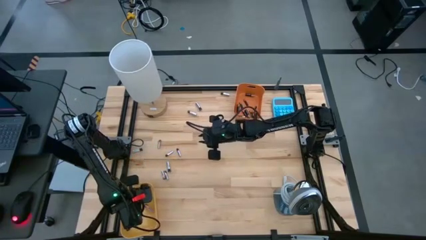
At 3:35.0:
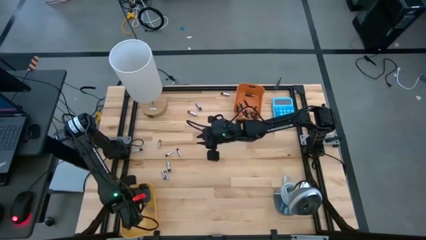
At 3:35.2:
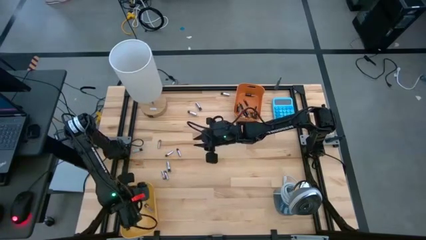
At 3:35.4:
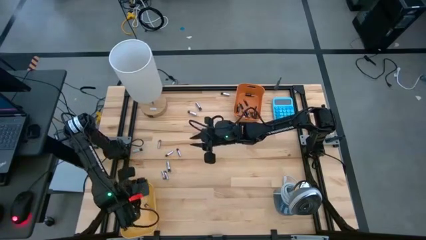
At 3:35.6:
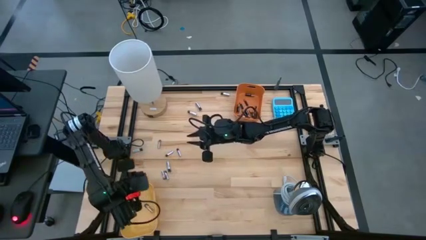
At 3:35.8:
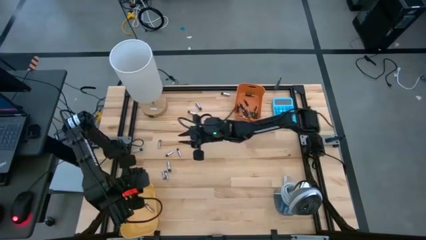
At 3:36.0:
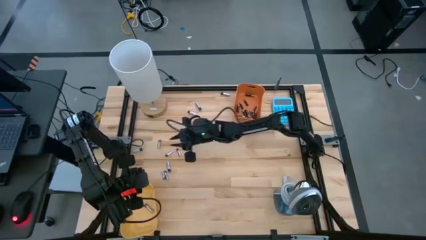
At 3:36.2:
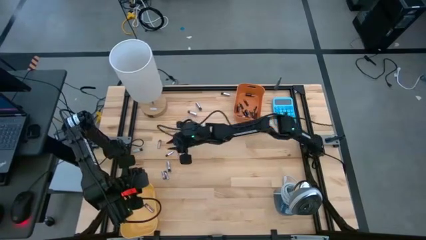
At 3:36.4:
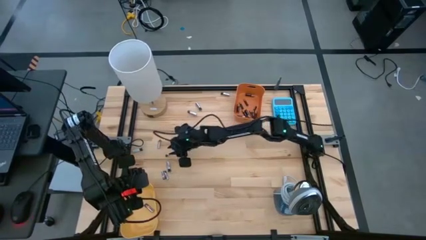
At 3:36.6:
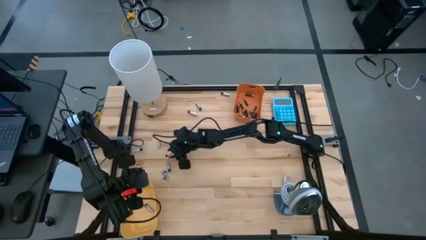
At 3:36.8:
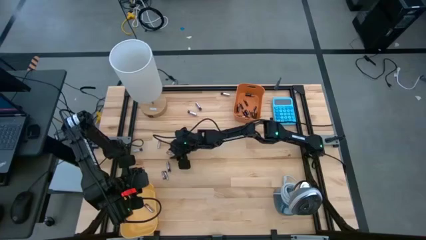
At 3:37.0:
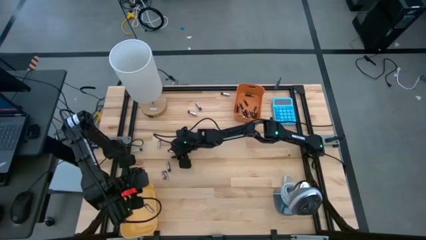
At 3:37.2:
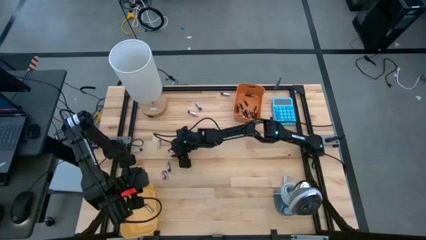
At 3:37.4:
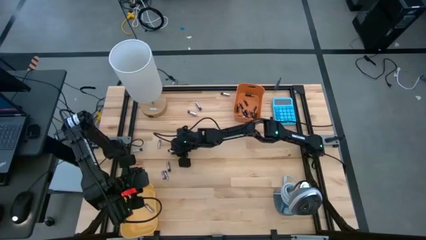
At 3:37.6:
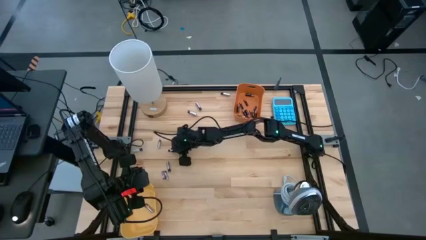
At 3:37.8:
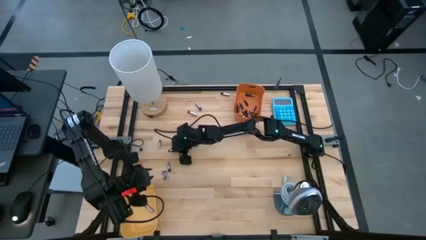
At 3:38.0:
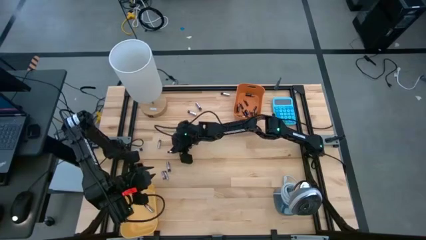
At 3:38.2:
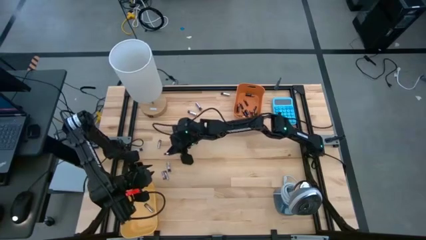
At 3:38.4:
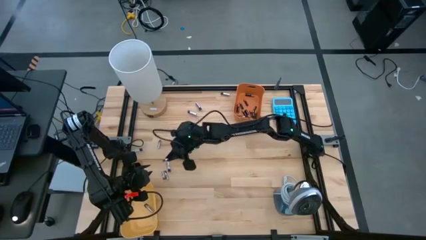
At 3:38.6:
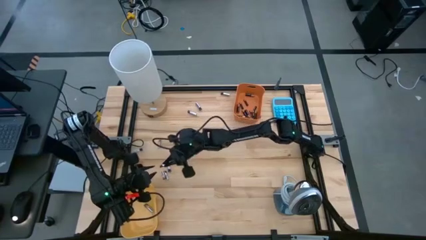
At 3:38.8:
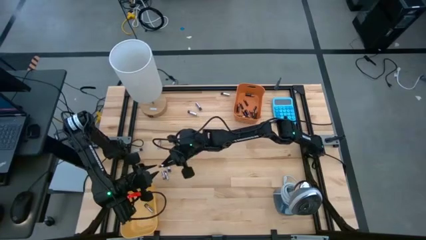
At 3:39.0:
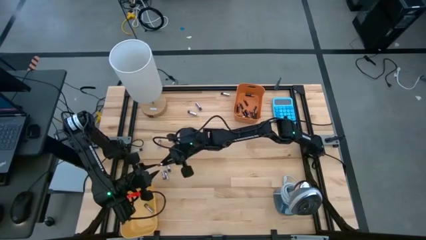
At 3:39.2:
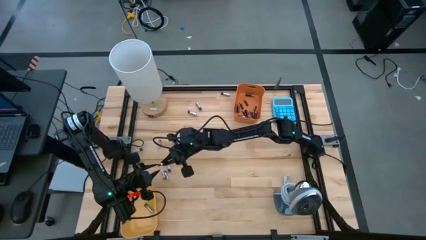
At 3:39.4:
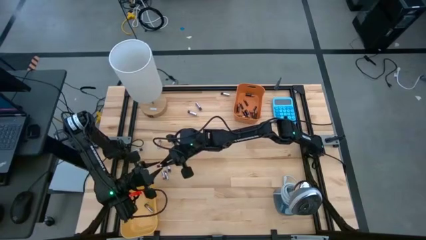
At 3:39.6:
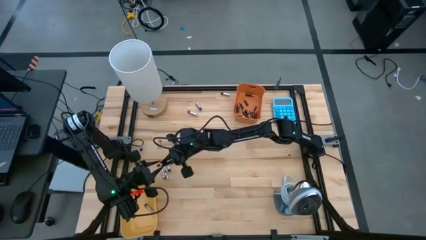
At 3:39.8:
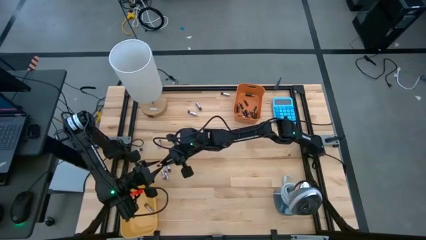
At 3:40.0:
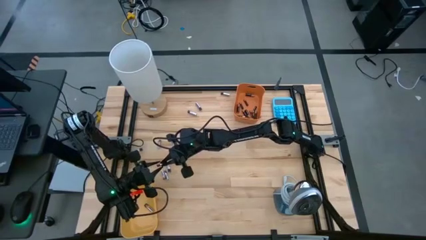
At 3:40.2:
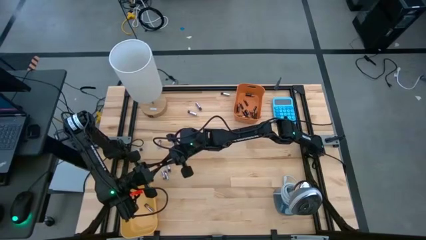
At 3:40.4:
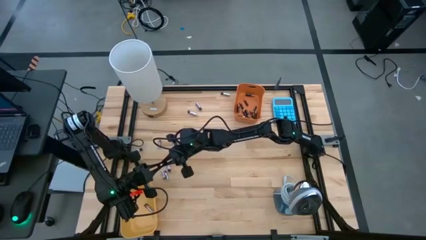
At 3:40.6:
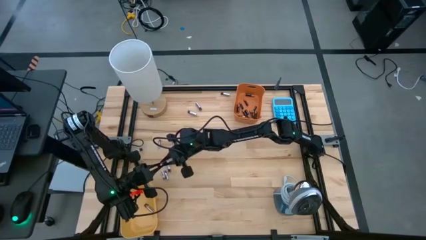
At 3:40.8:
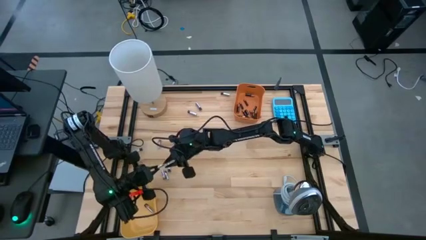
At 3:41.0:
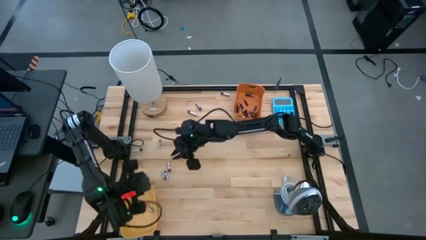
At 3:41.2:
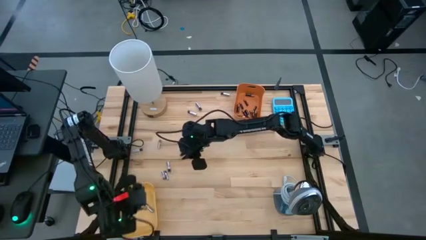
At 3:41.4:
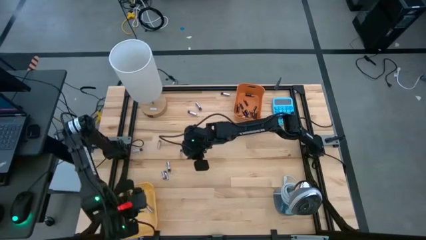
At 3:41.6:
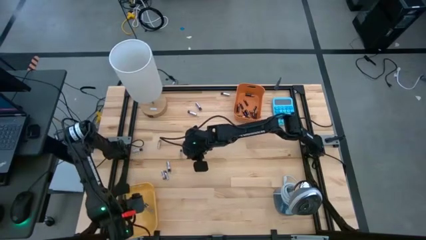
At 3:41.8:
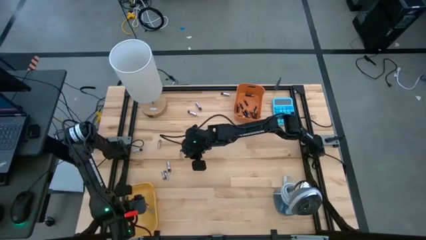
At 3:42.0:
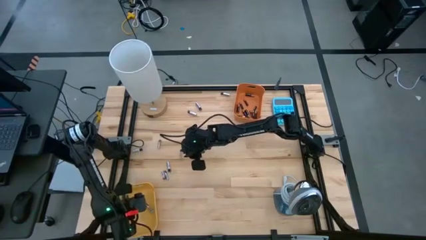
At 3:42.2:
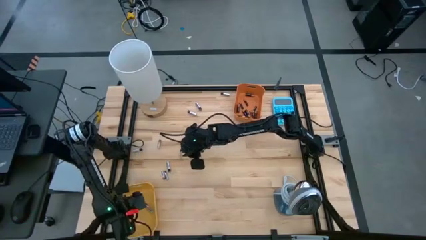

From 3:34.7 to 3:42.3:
Task: Sort batteries
Put the silver battery into the yellow bin

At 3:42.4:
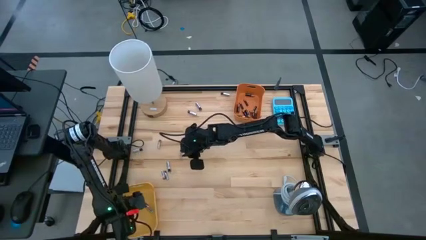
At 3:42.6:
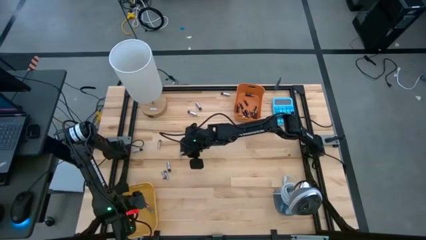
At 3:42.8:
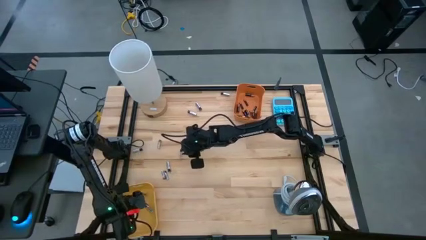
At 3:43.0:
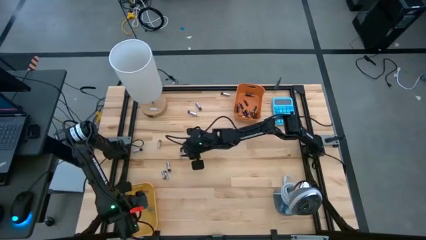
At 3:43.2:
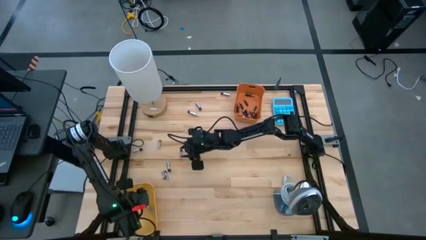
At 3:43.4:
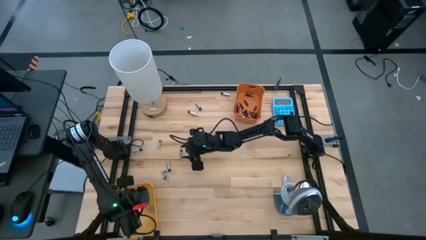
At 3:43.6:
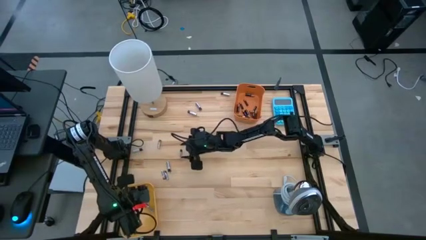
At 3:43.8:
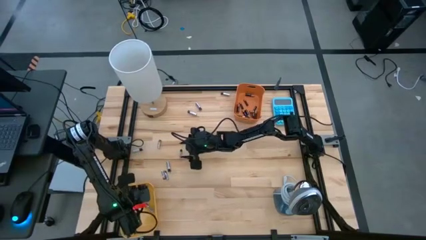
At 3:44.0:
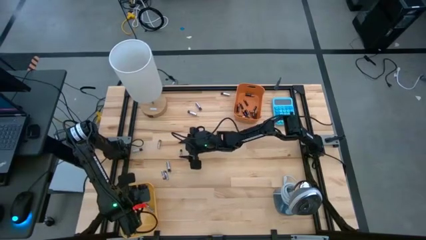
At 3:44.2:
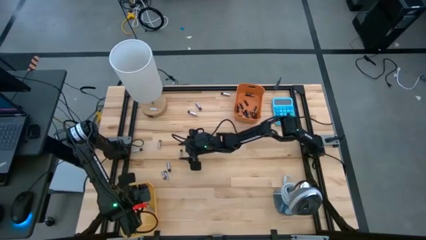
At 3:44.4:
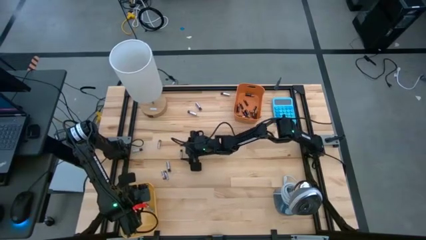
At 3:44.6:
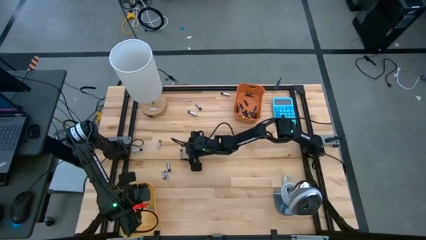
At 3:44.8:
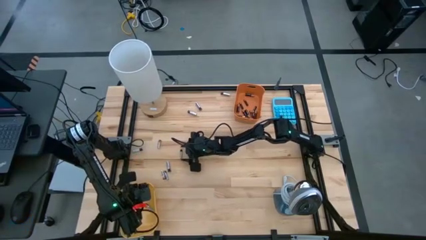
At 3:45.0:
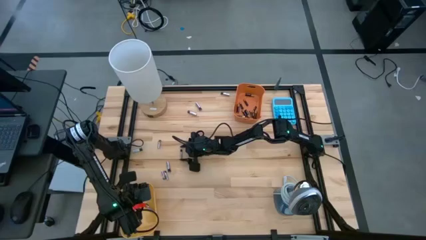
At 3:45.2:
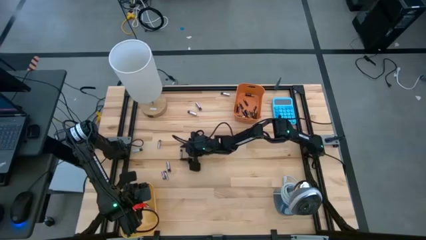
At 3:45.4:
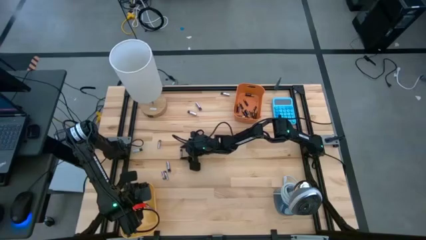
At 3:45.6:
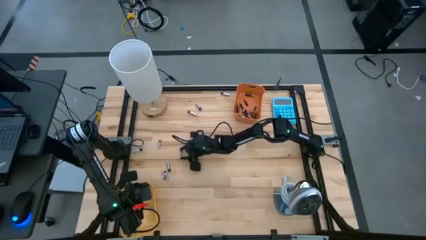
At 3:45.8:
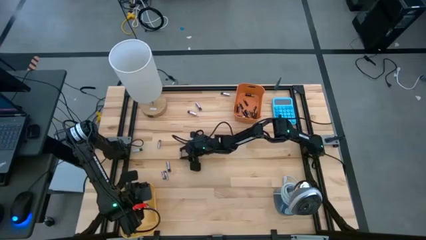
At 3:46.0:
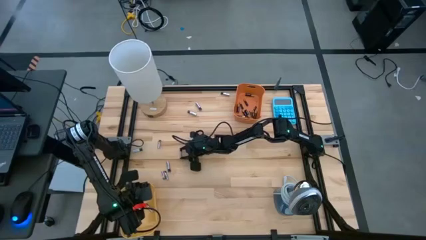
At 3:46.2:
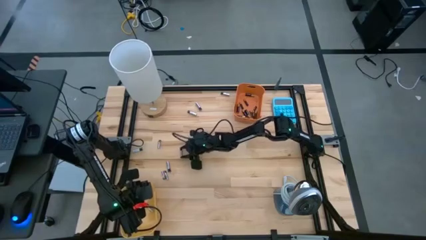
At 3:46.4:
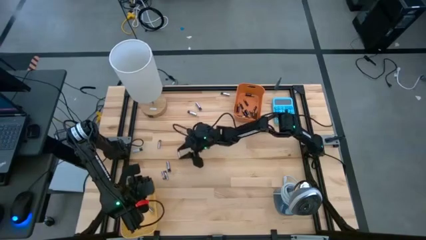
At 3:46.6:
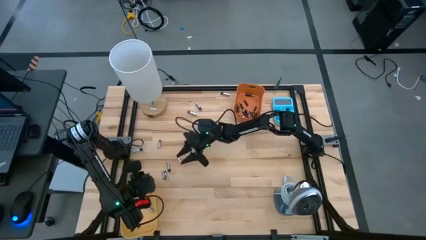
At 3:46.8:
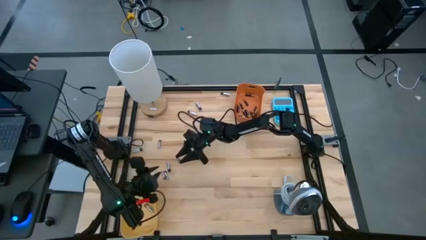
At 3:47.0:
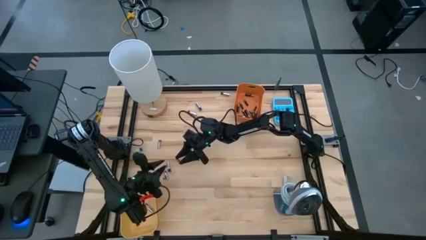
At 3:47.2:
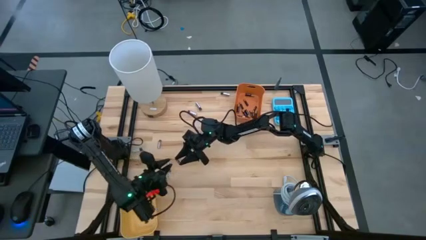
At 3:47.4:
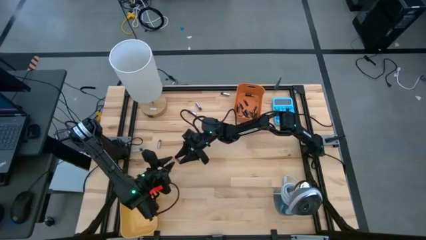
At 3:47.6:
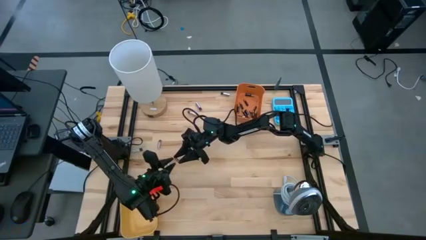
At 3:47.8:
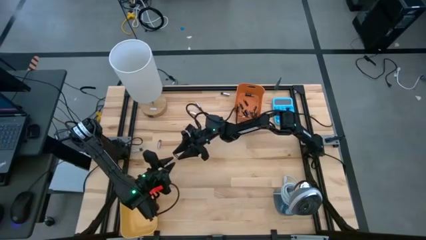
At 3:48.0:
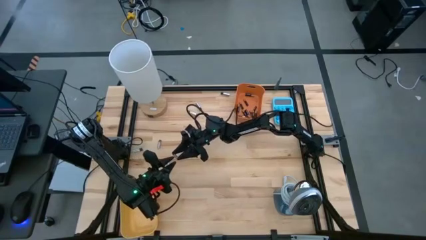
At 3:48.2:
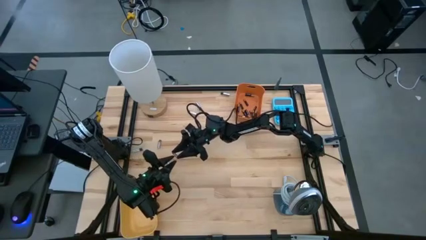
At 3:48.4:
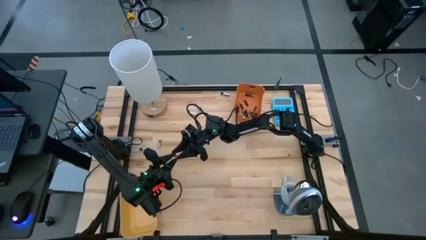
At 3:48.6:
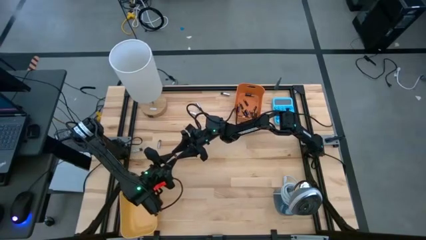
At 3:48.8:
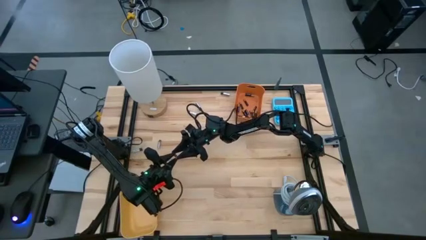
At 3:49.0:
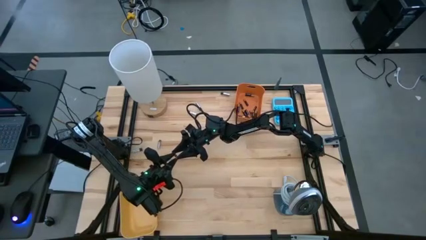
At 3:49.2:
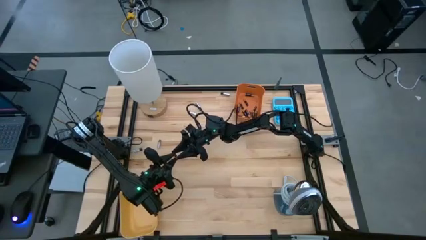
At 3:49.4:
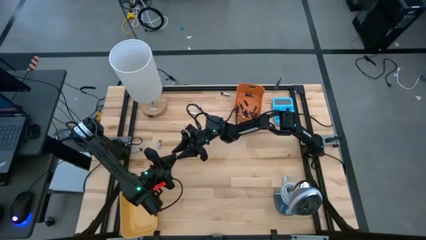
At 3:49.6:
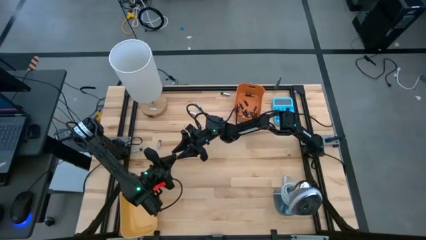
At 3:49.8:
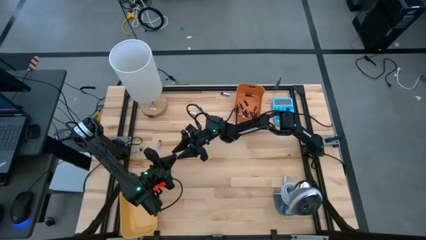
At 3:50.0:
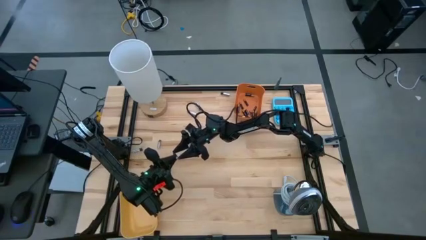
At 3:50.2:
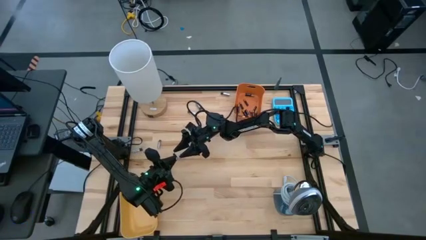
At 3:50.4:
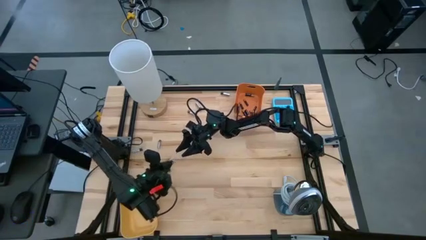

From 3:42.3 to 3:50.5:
Put the silver battery into the yellow bin
